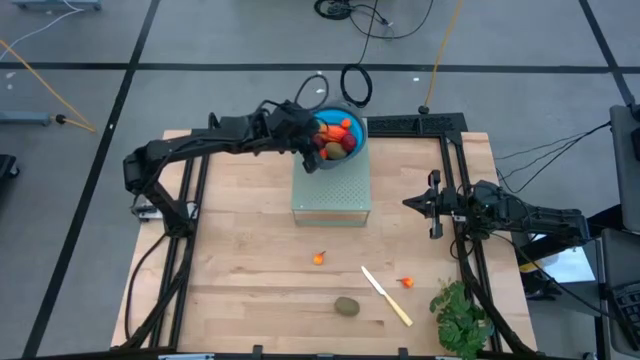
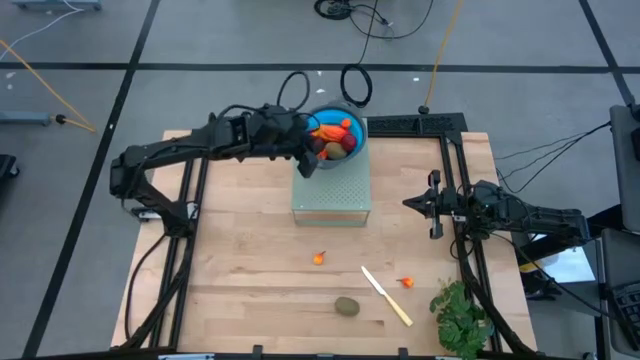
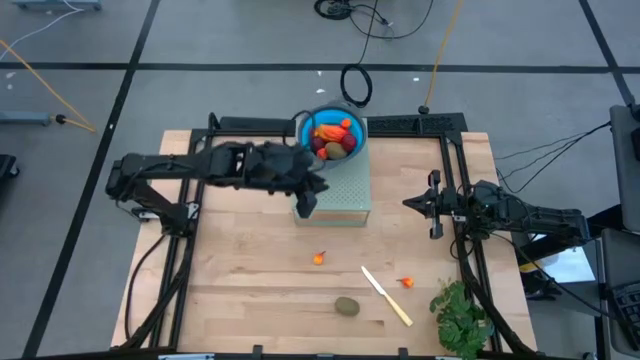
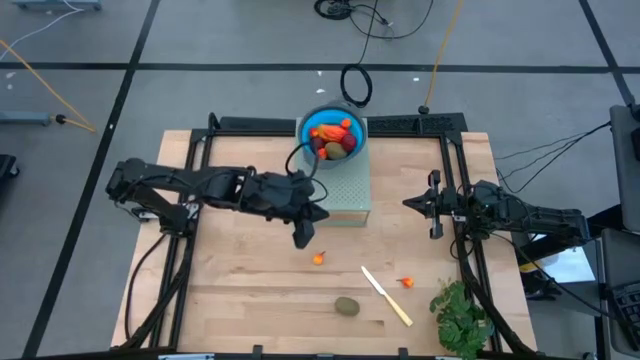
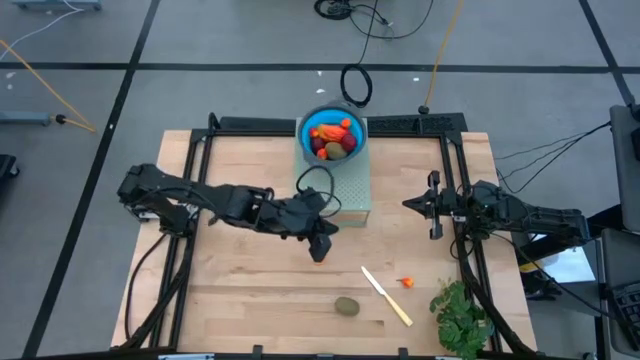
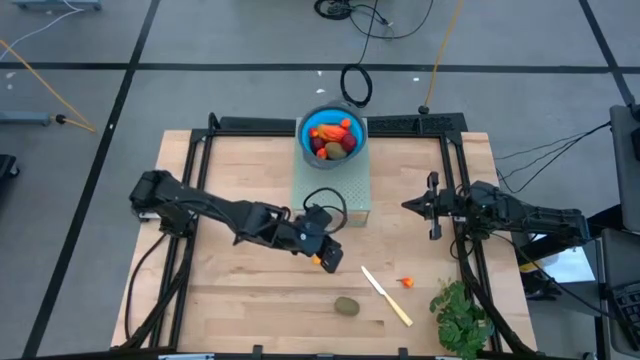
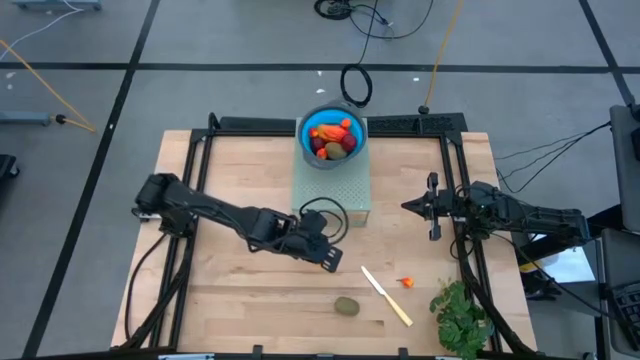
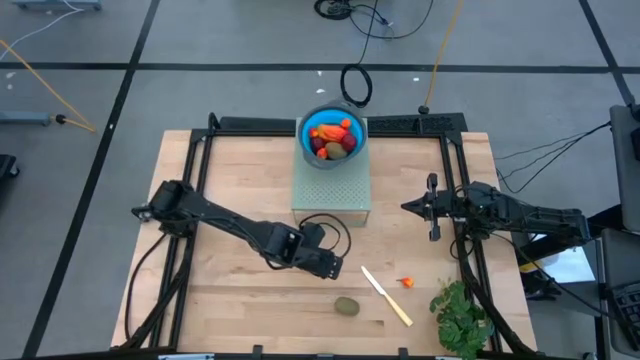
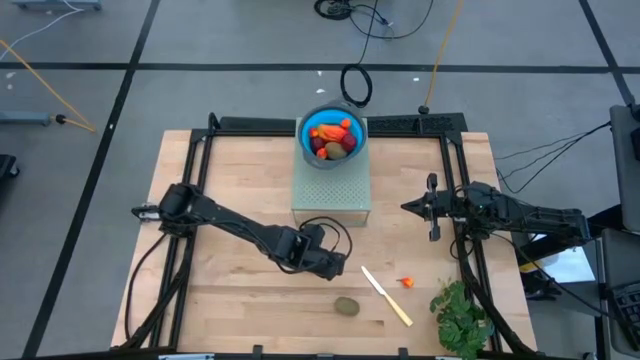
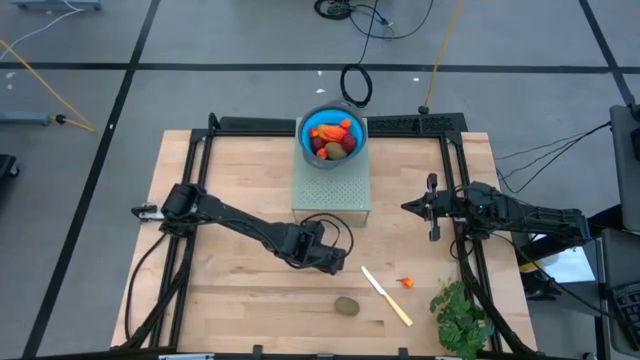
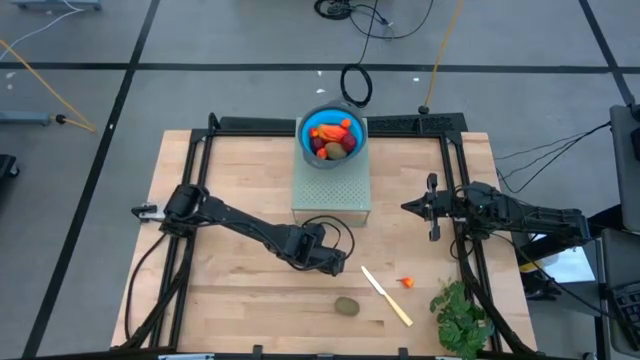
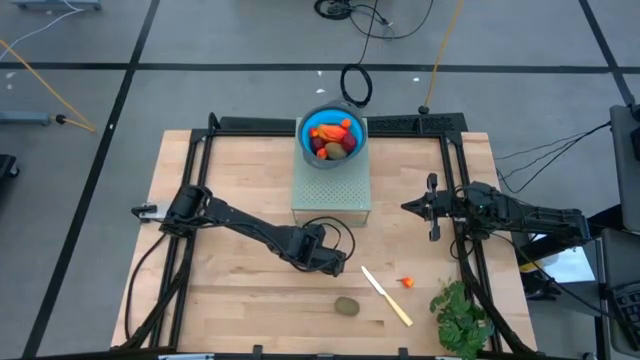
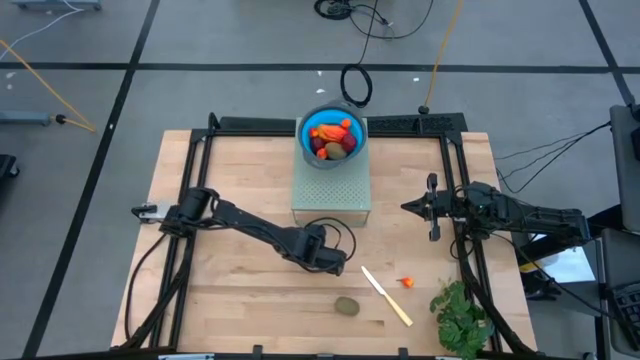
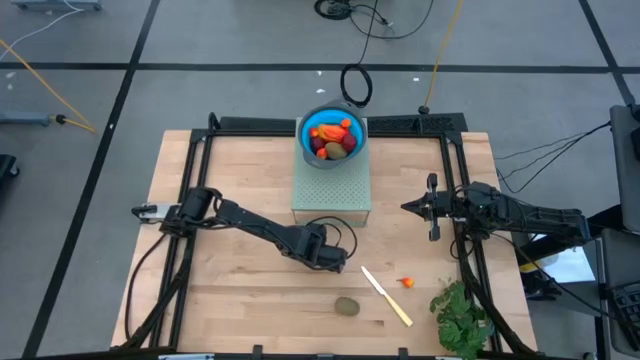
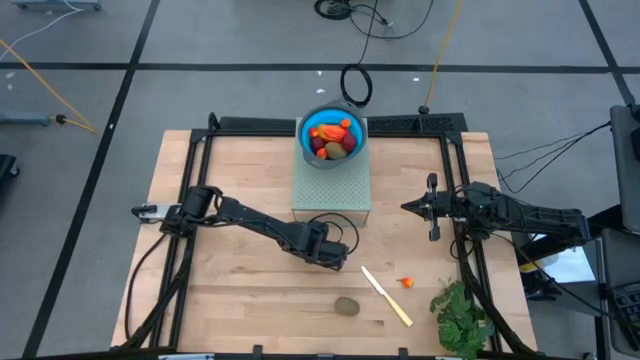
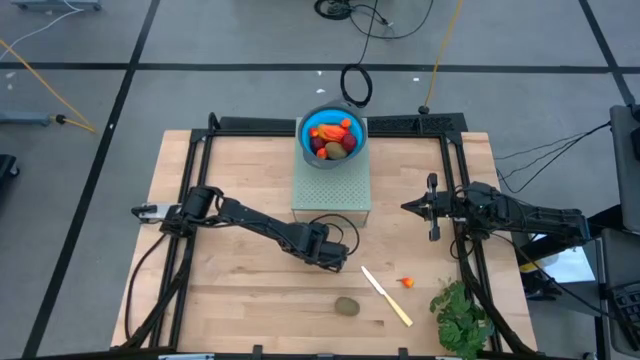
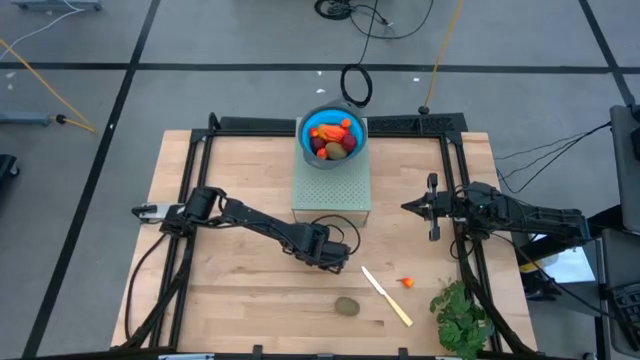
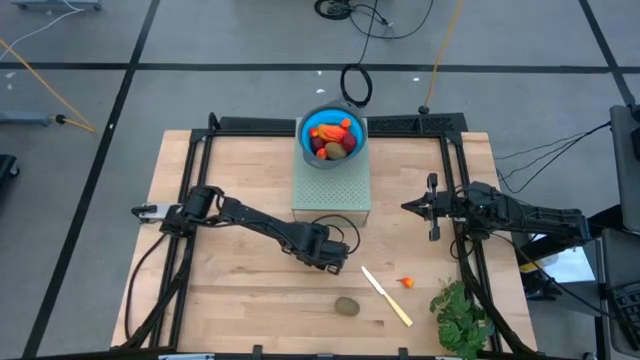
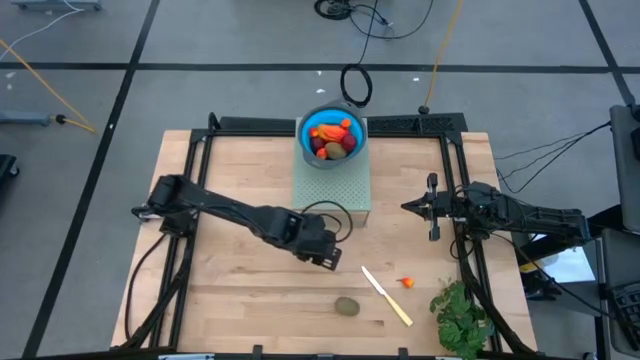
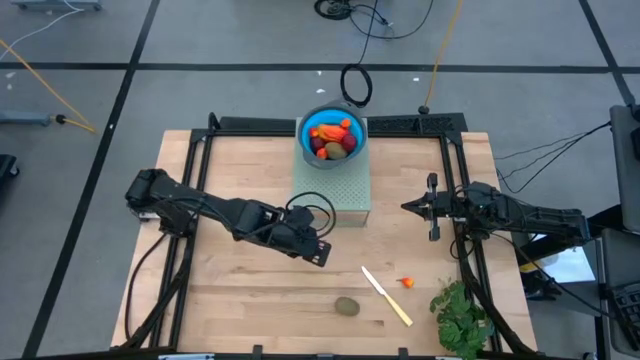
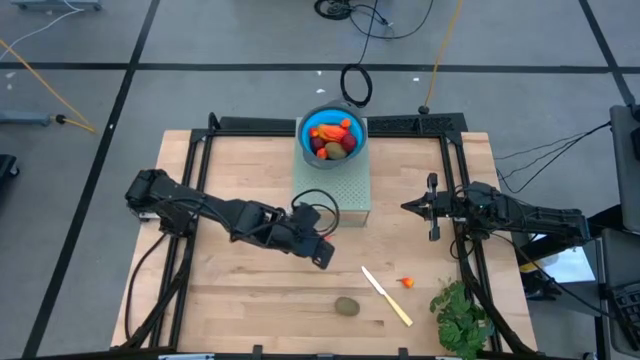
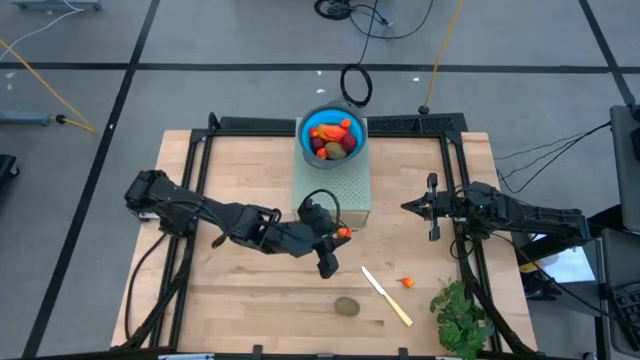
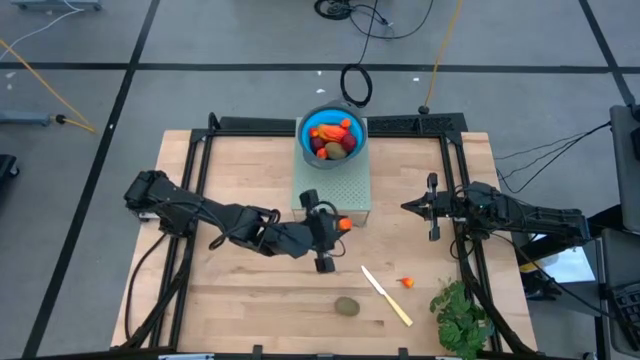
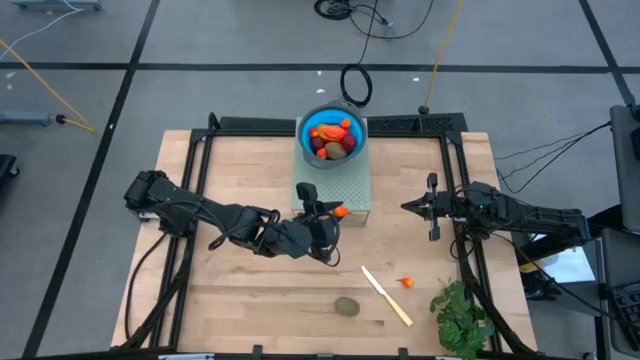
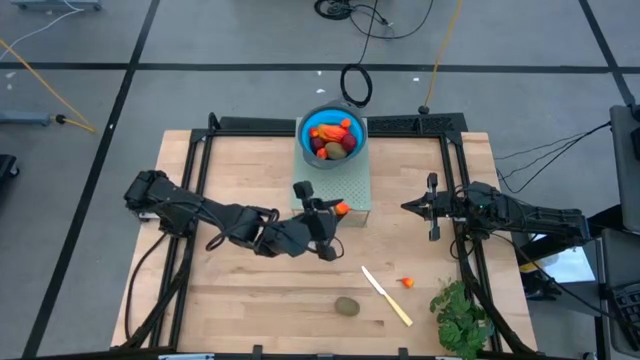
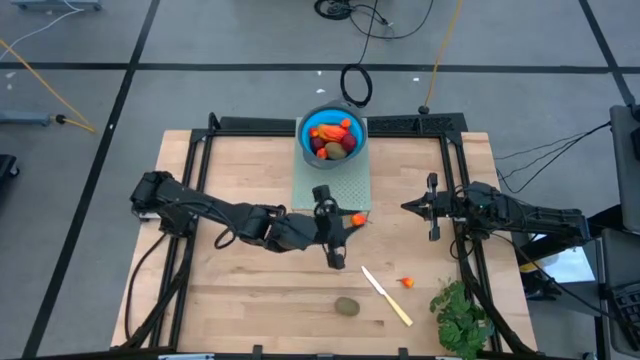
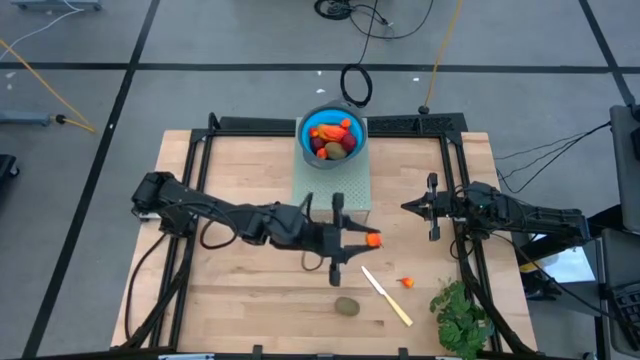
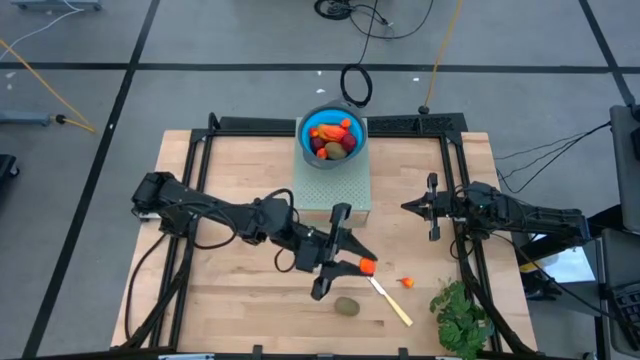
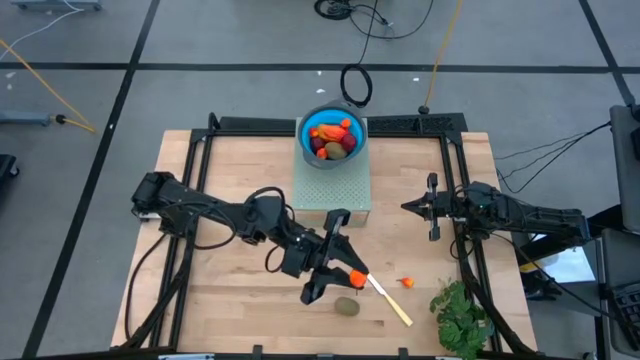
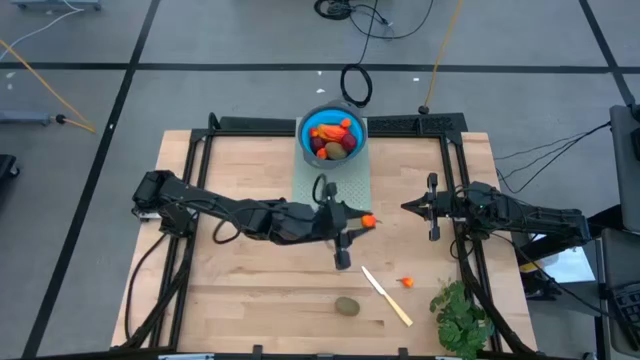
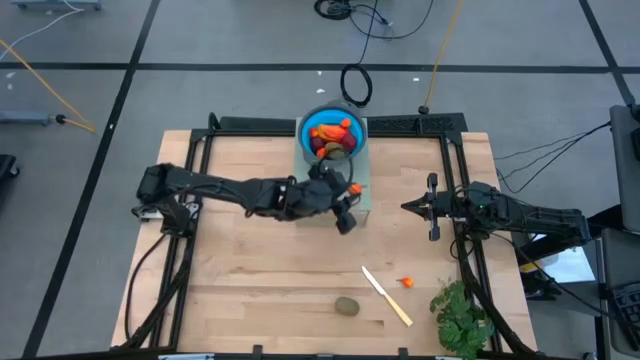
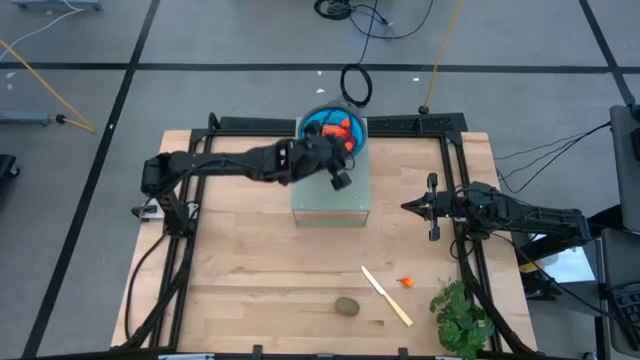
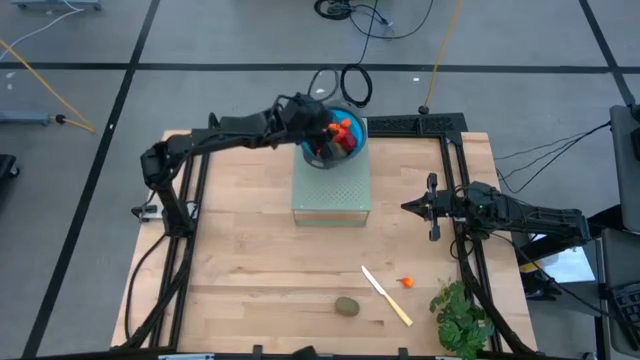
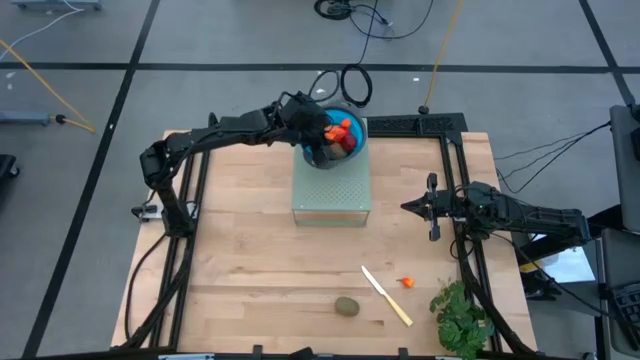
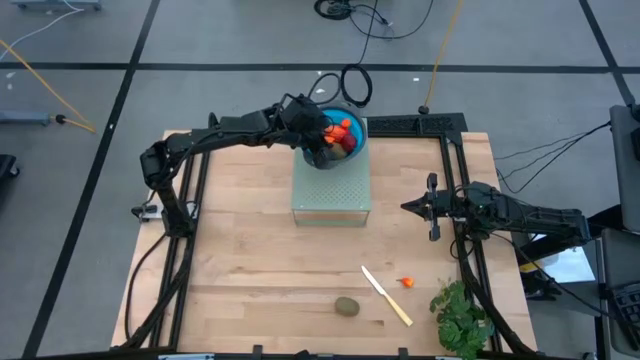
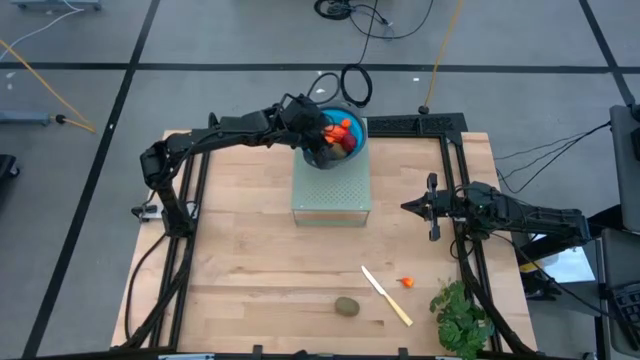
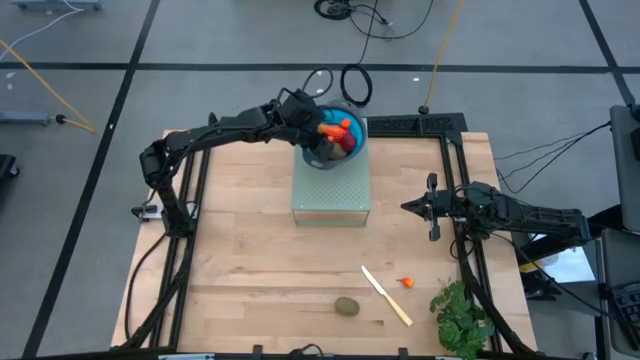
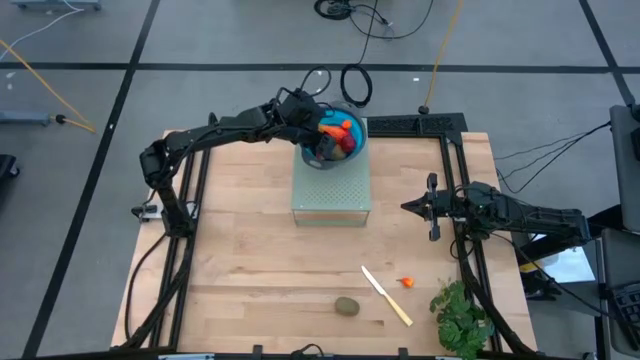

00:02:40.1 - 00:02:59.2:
Task: Pick & Place Fruit
Put the peach into the blue strainer bowl on the shelf

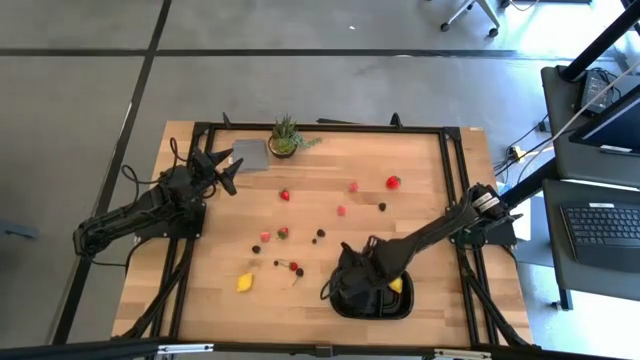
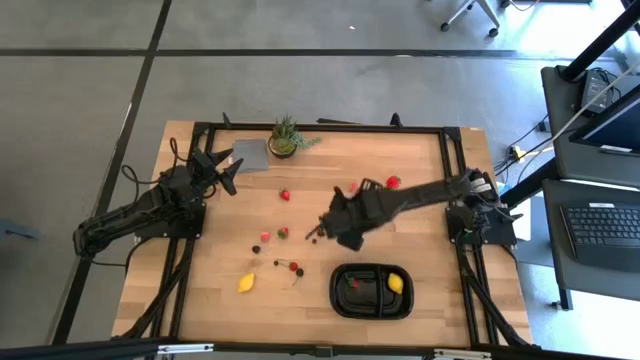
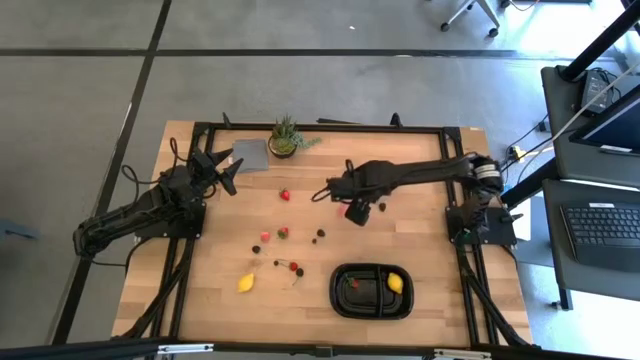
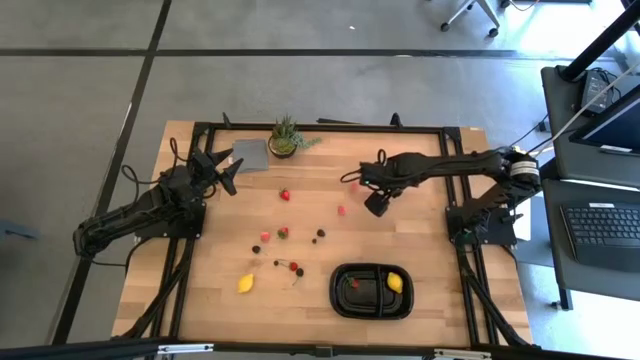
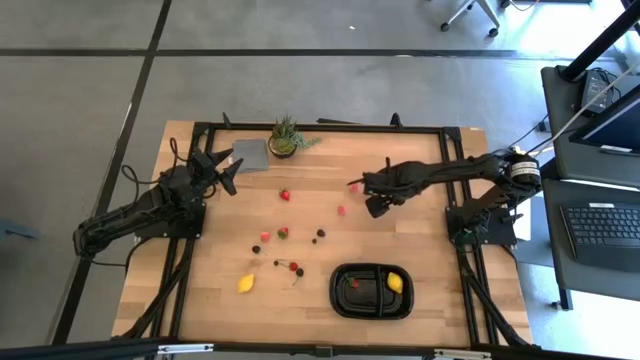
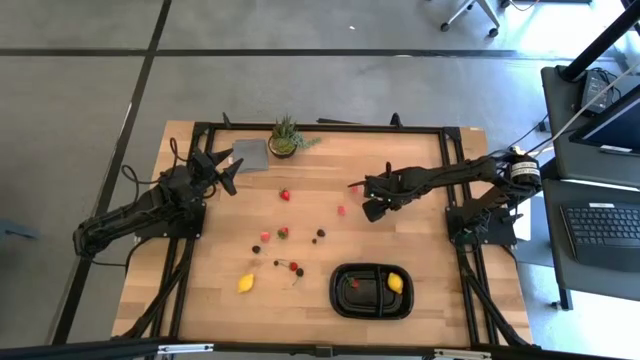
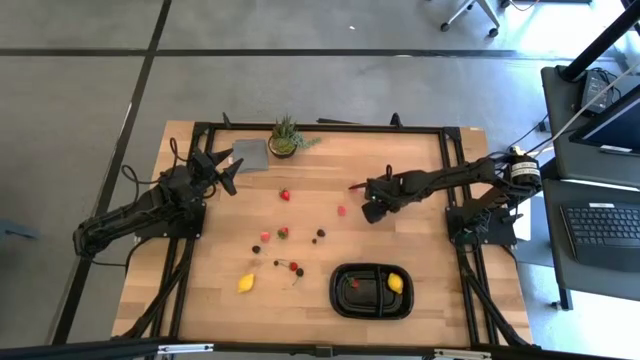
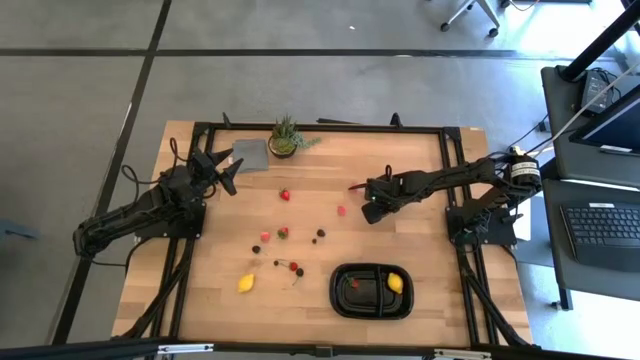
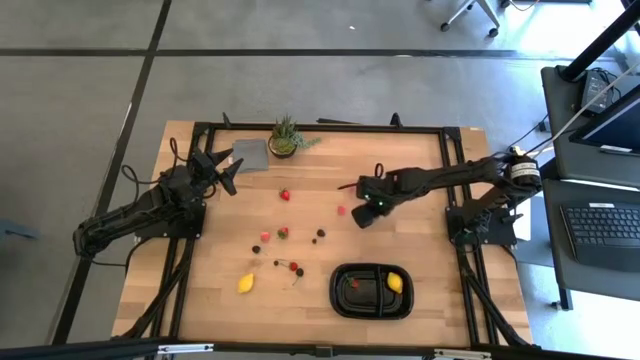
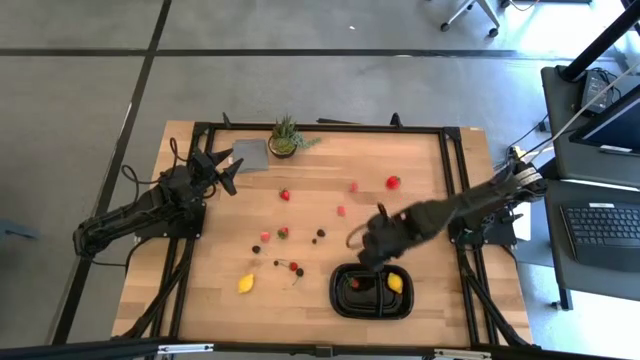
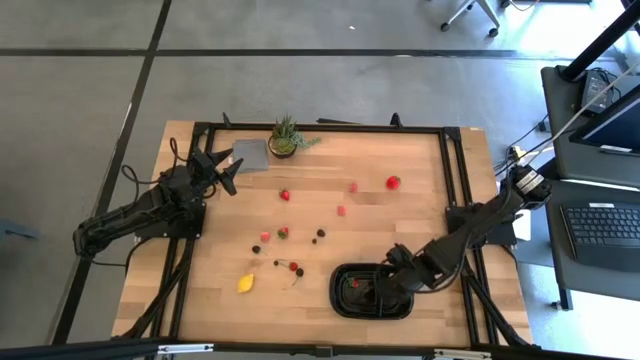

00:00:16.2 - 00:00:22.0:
Task: Pick and placing Produce into tupperware
Put the black blackberry into the black bin
